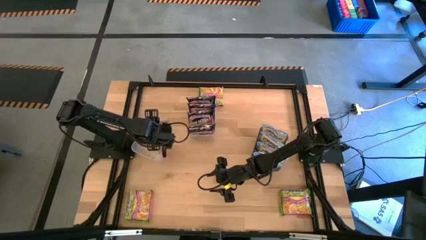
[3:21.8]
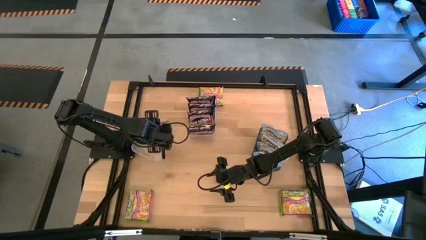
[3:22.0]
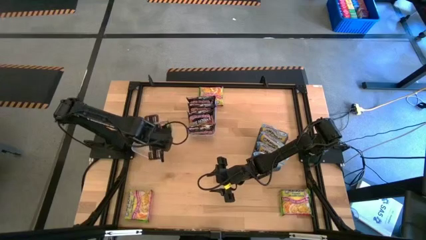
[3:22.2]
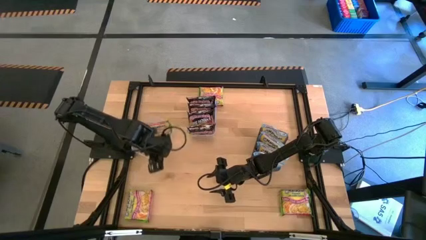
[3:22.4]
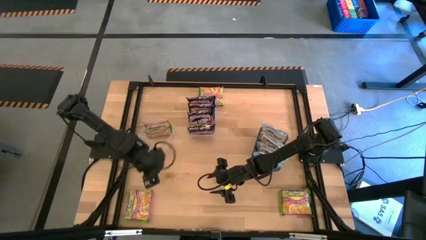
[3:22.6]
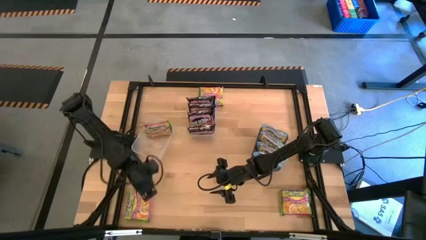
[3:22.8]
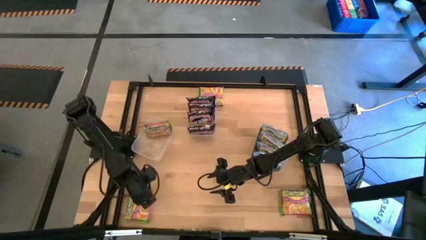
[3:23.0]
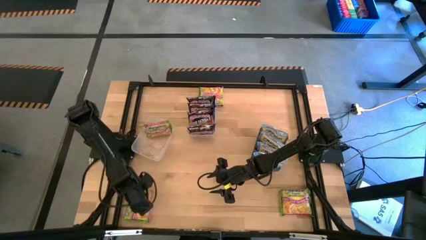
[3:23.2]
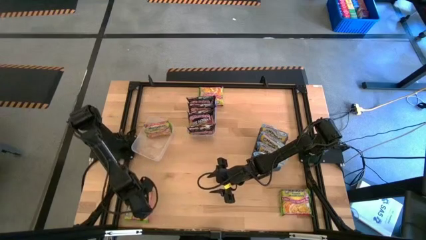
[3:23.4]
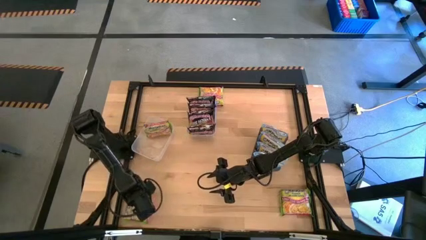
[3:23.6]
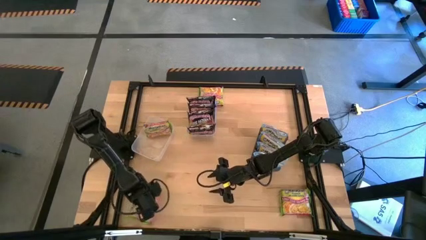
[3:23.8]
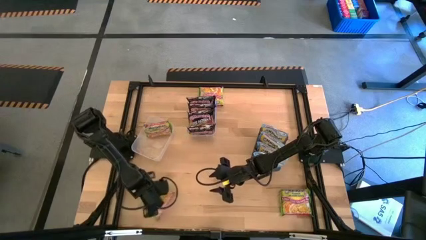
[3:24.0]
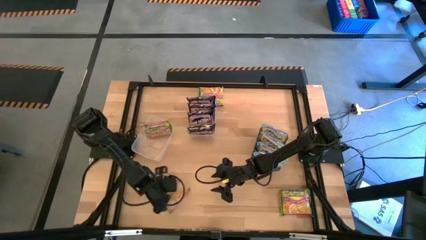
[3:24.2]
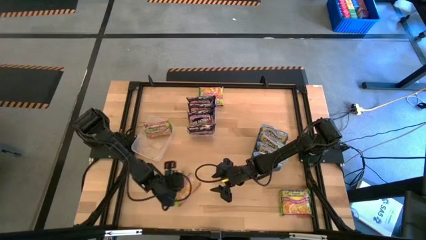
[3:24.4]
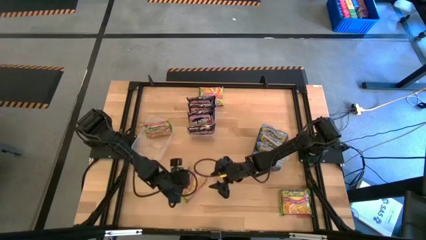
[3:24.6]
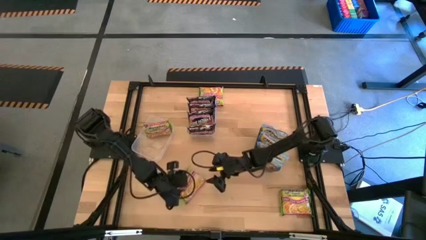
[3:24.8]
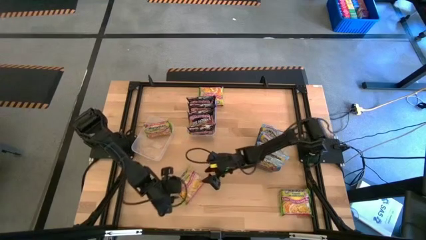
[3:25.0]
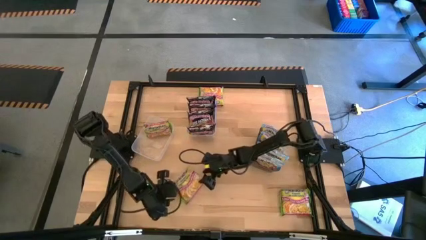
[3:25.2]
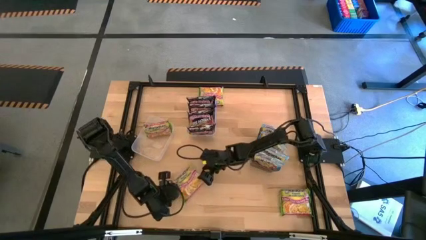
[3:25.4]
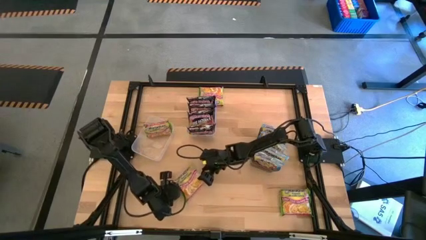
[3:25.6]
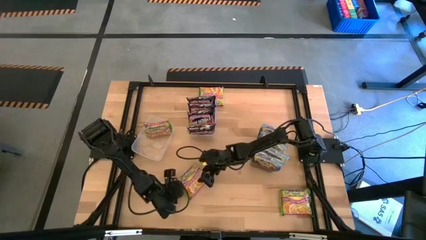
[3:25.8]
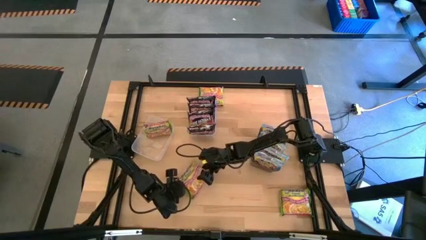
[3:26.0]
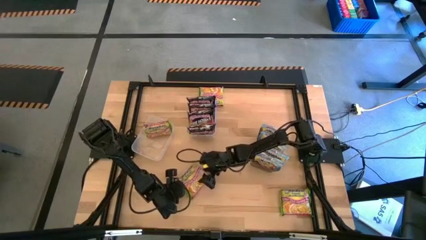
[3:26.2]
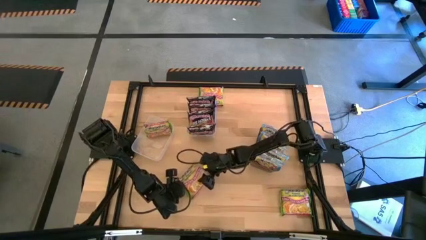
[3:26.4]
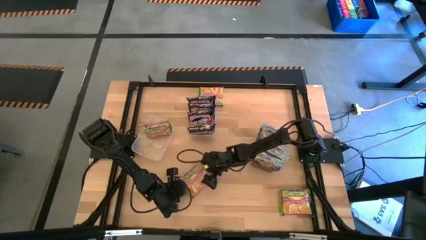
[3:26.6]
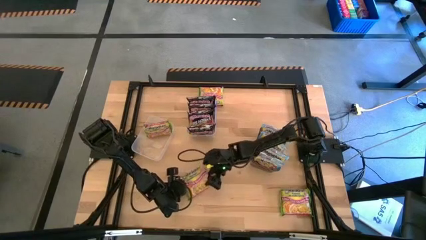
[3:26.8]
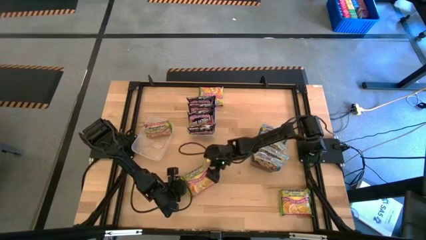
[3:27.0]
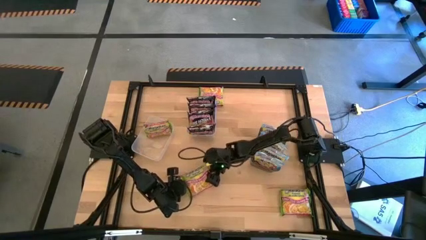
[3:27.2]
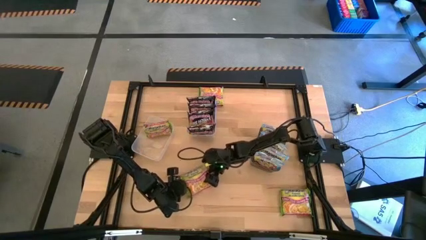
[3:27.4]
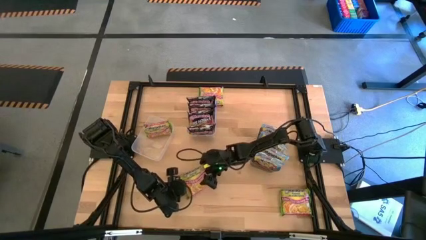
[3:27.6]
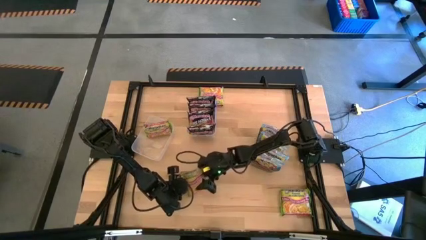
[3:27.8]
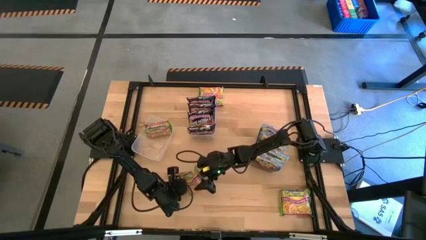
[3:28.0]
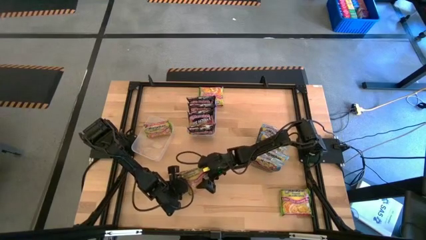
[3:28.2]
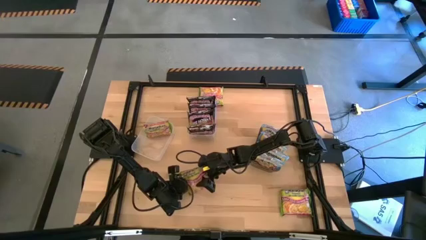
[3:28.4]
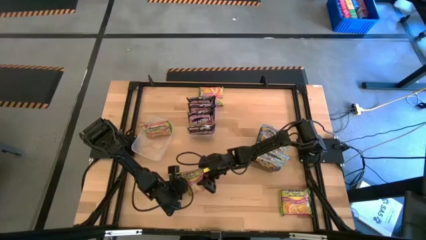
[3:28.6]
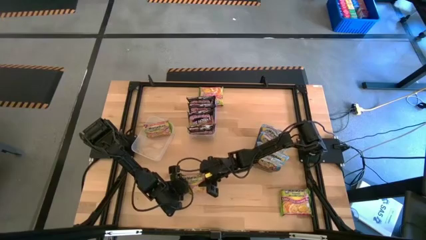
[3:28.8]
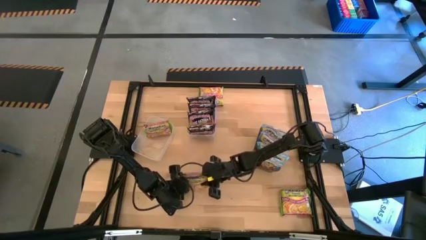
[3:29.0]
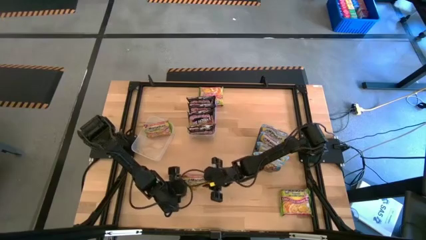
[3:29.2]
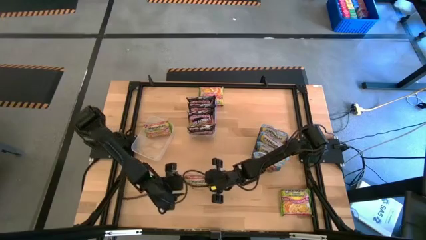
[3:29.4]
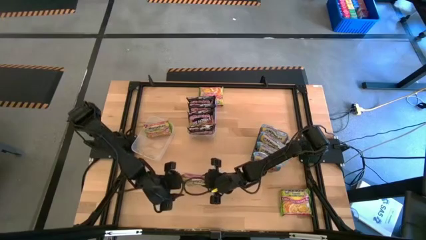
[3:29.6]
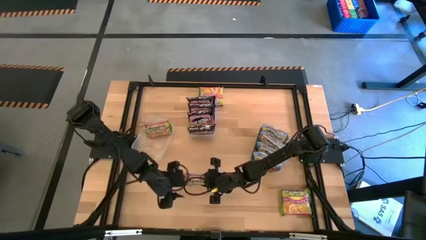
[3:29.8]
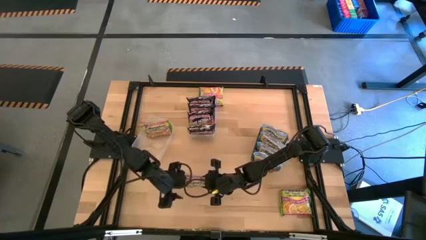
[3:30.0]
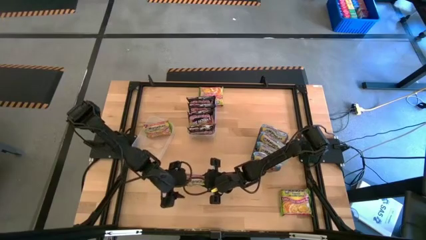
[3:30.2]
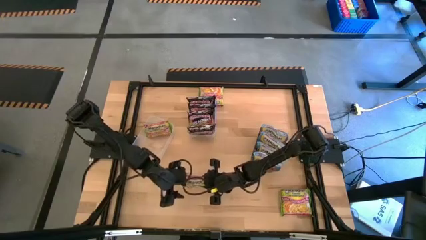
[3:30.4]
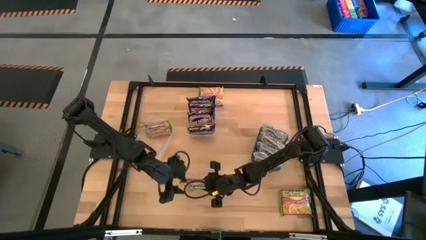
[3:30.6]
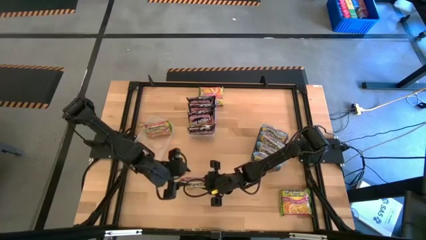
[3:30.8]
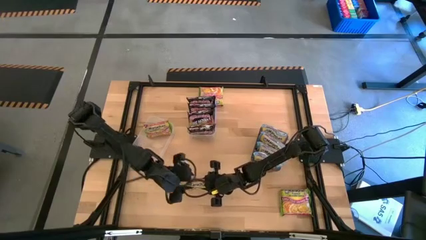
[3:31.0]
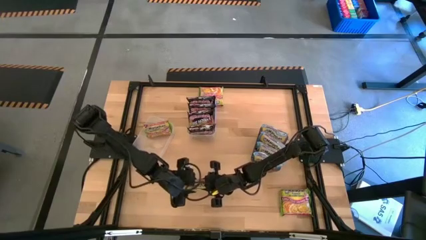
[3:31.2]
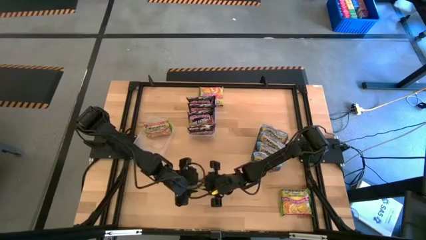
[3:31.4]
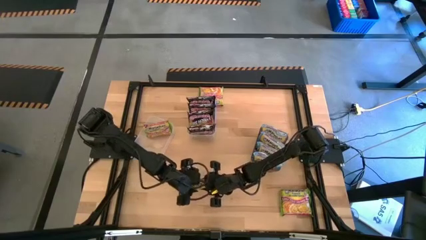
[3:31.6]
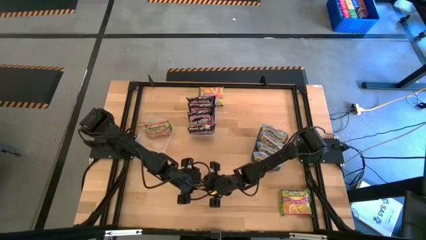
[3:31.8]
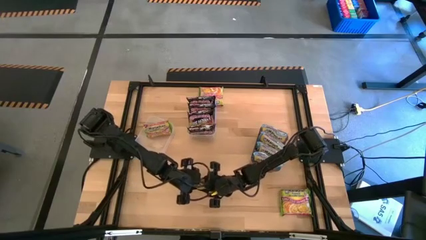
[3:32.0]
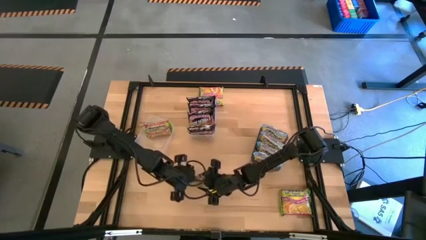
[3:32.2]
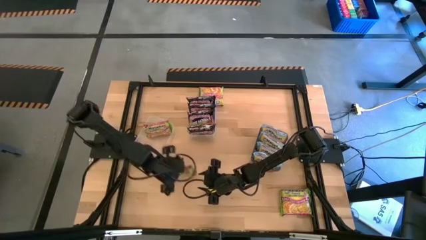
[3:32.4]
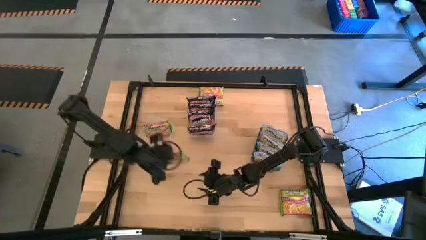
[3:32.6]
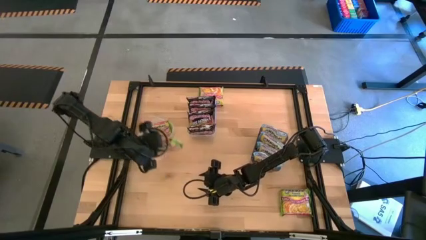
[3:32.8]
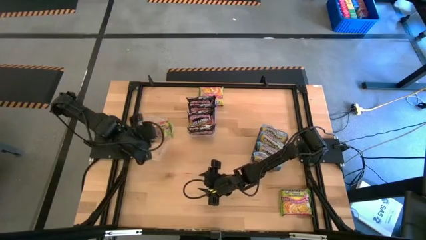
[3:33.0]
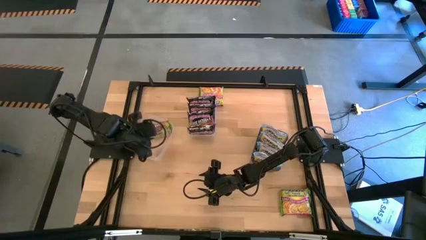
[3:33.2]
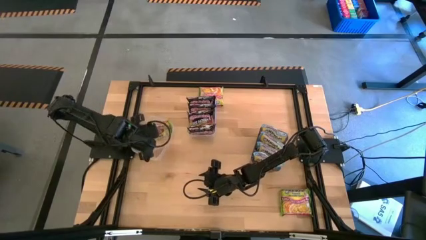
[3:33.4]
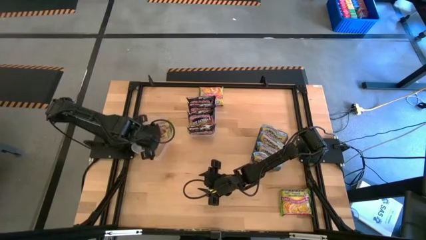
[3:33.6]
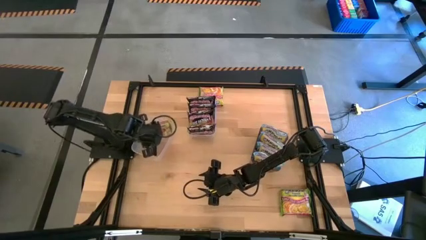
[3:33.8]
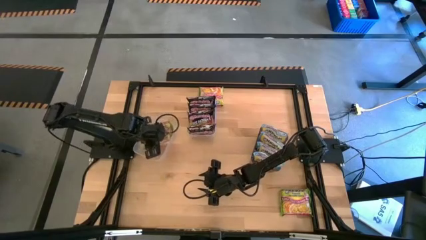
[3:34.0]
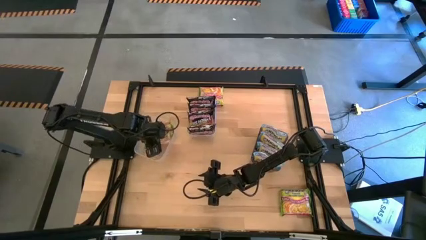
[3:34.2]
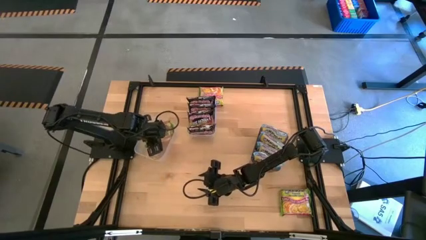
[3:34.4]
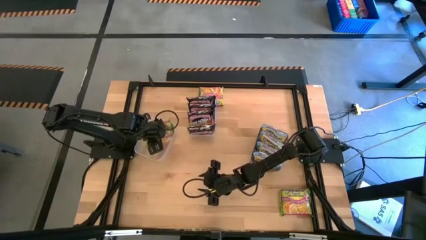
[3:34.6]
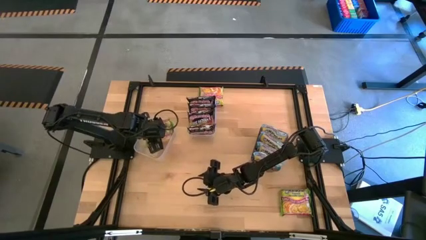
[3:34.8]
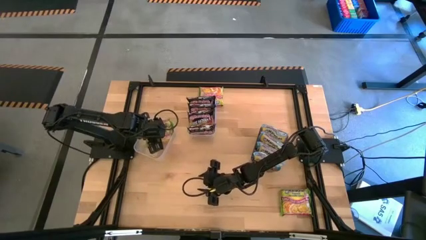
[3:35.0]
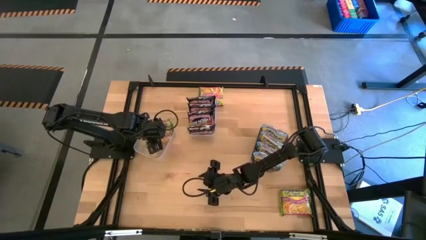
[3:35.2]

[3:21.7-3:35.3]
Task: Sort Maruchan noodles
Put the green noodle pack into the left transparent bin

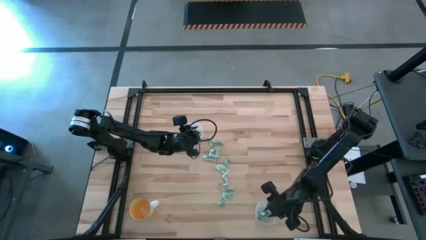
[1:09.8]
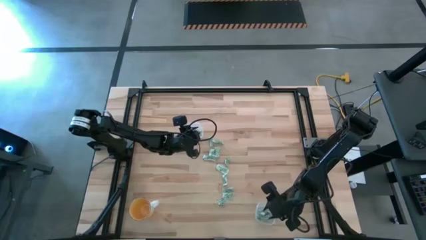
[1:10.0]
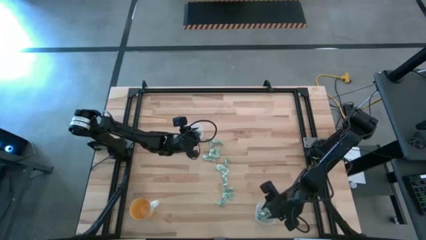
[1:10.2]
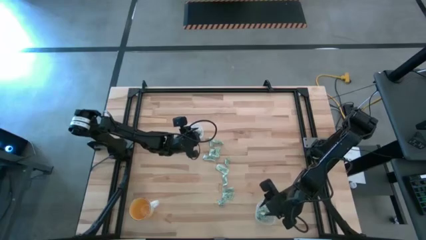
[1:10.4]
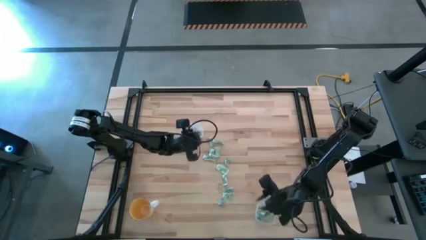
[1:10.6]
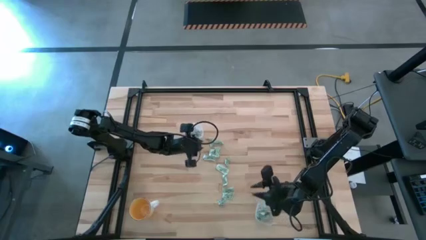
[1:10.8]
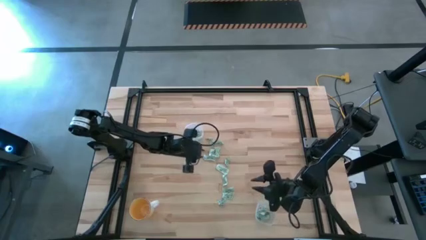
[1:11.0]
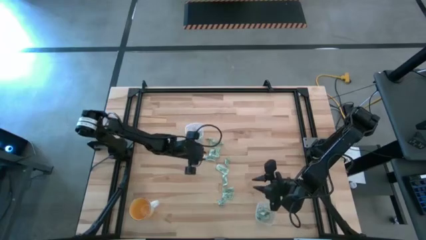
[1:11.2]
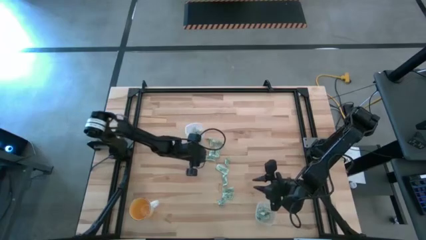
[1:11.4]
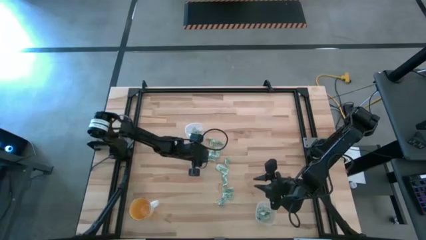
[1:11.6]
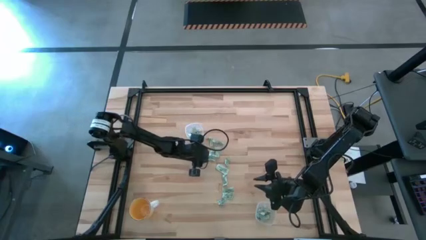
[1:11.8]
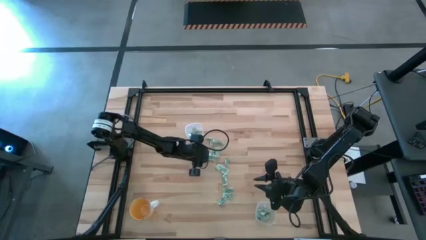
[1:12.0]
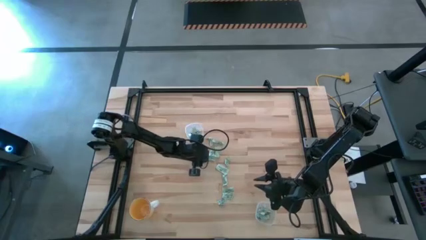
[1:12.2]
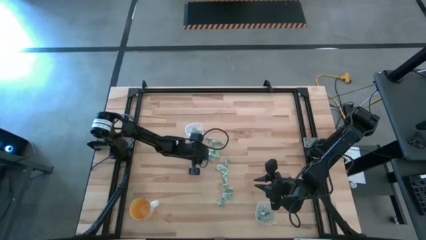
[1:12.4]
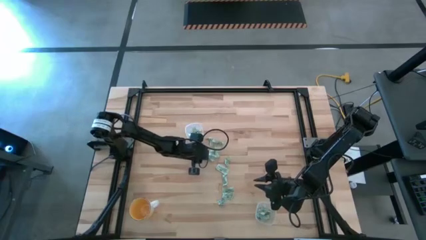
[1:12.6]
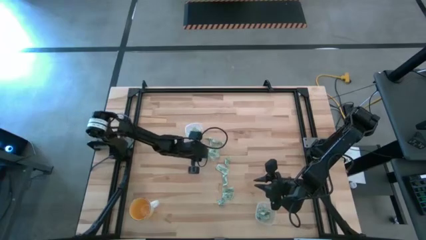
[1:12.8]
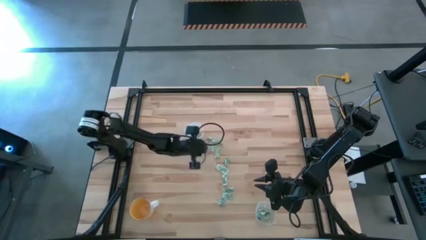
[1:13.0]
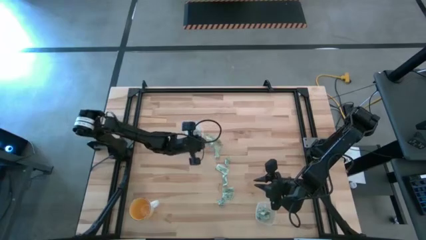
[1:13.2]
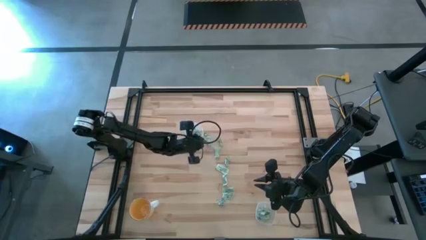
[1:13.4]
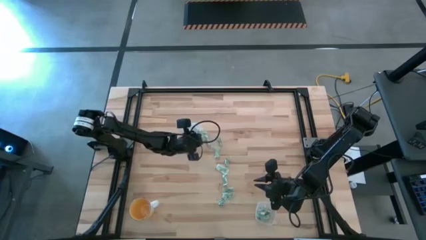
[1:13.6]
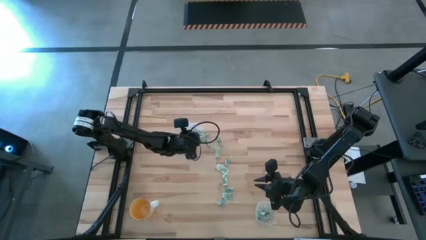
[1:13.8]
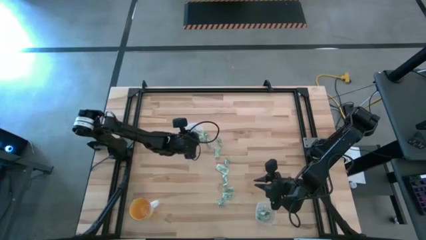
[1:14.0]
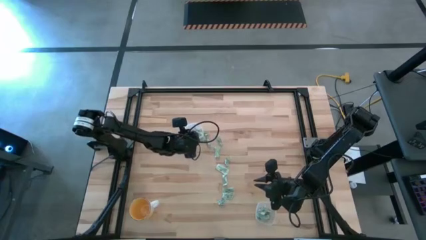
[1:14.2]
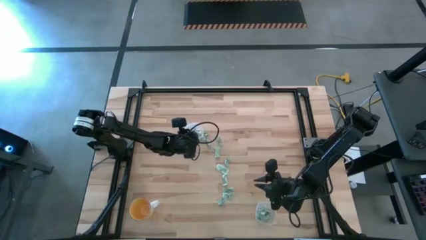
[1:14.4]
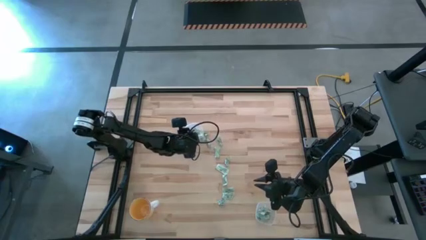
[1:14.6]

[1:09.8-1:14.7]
Task: Pick and place Stevia / Truvia into bins
Put the stevia packet into the top transparent container
